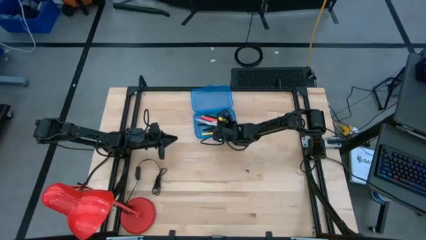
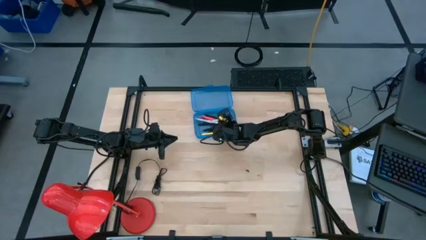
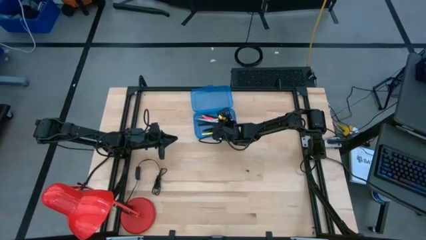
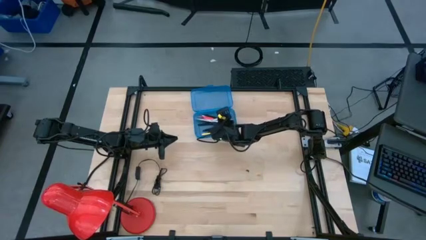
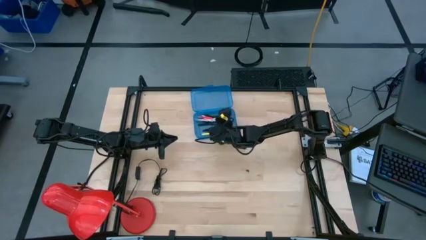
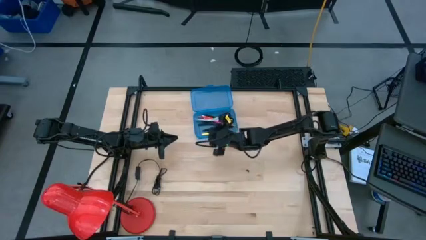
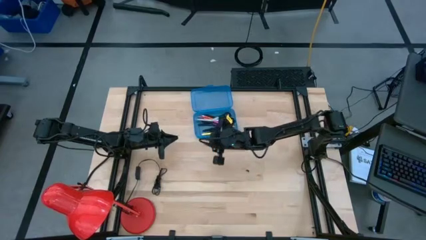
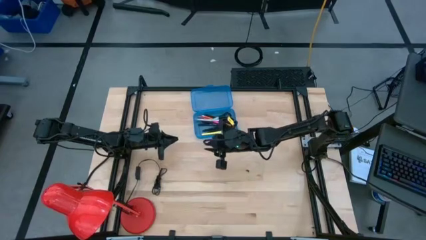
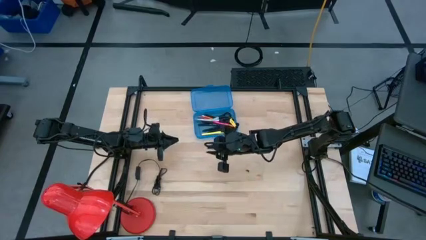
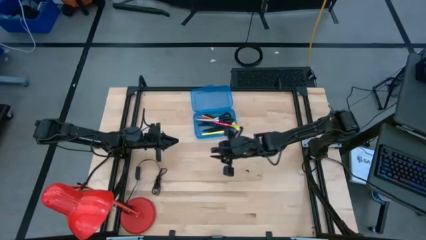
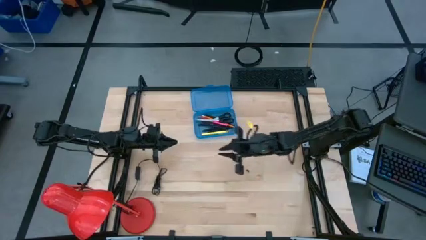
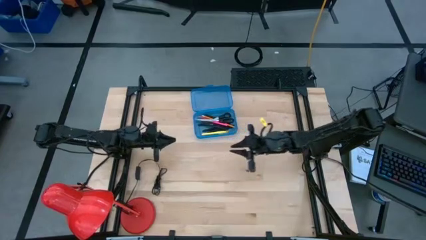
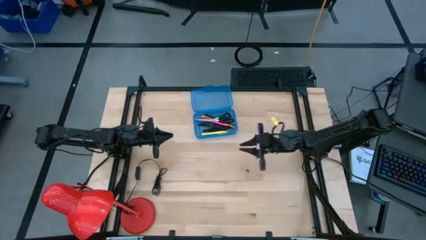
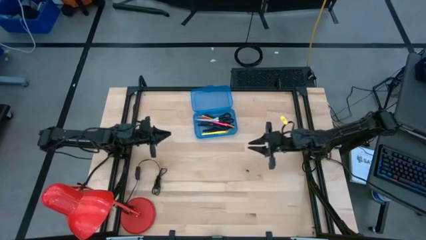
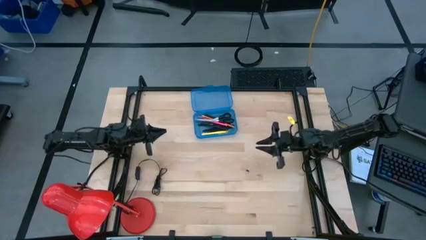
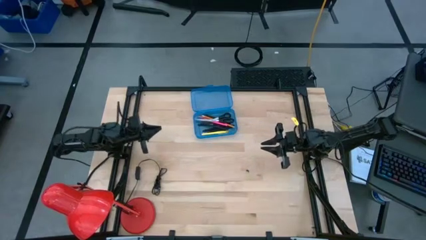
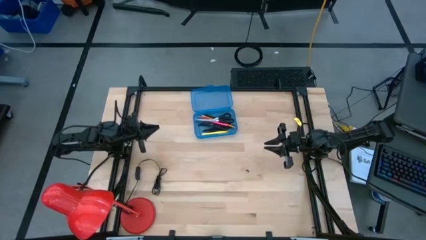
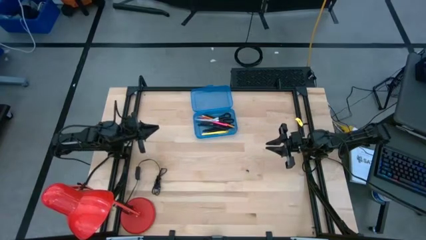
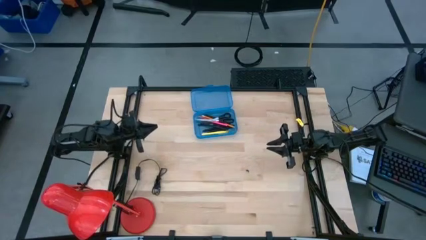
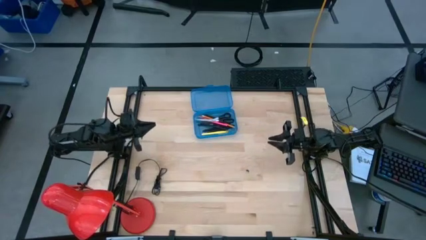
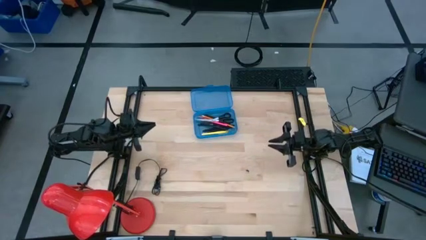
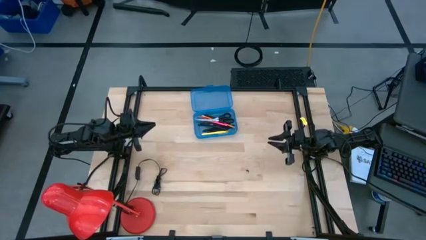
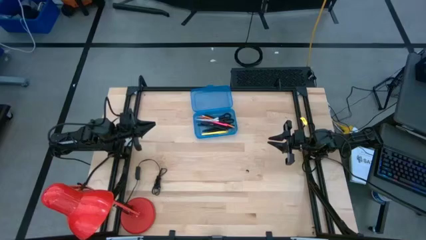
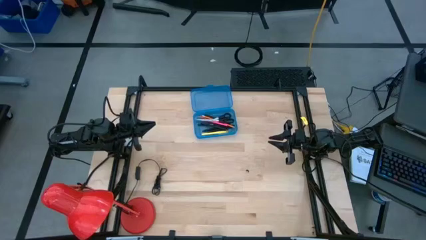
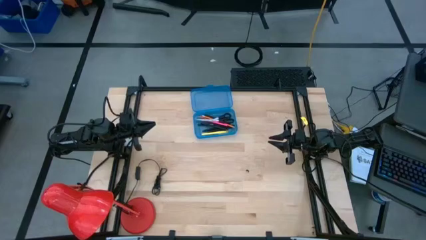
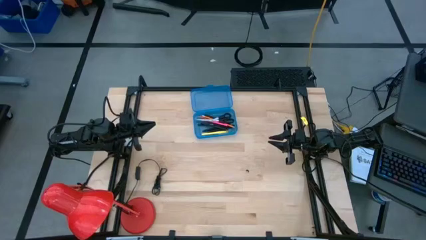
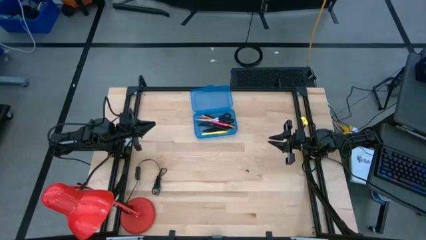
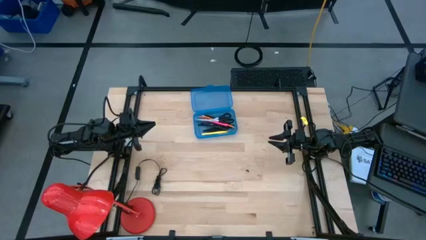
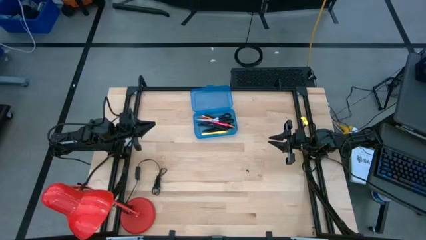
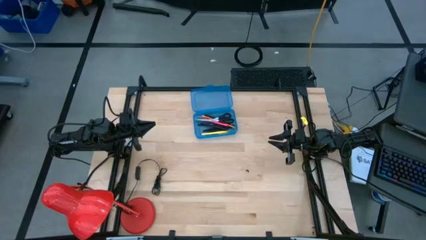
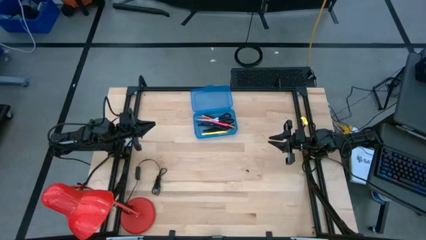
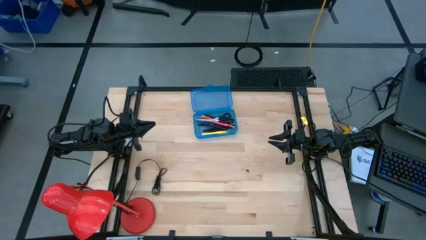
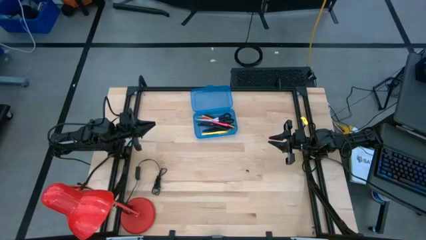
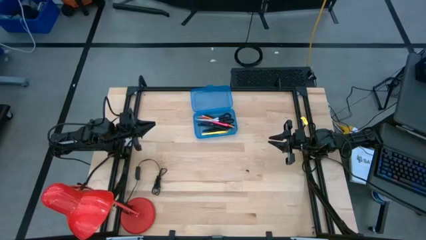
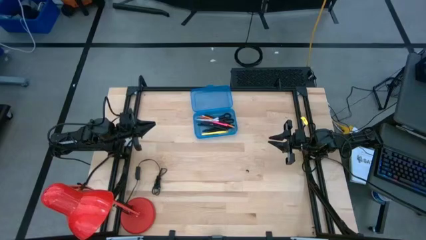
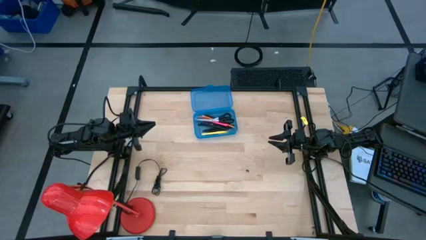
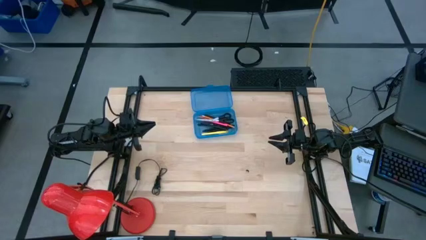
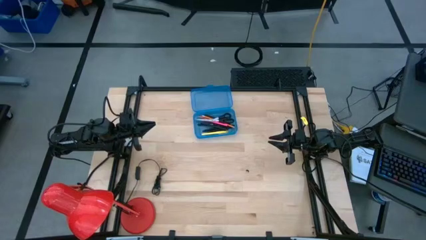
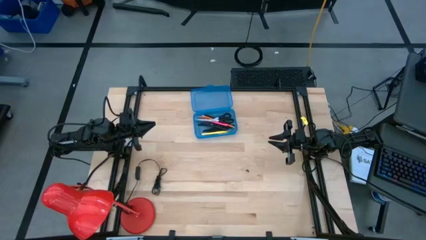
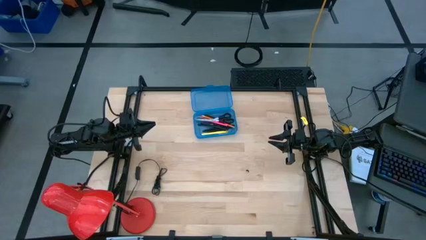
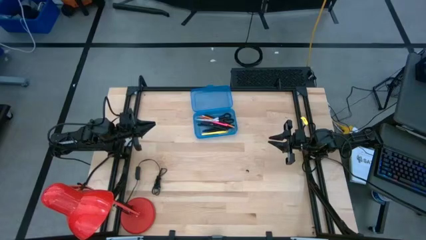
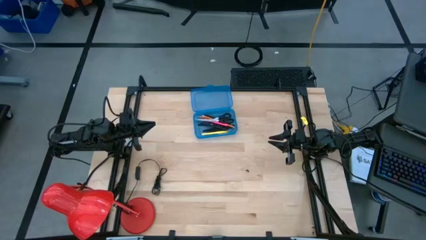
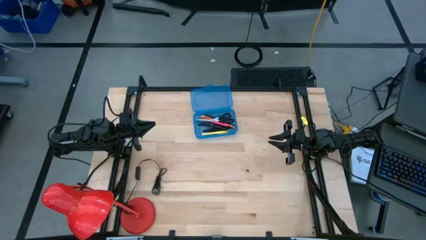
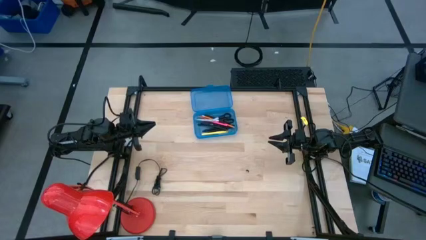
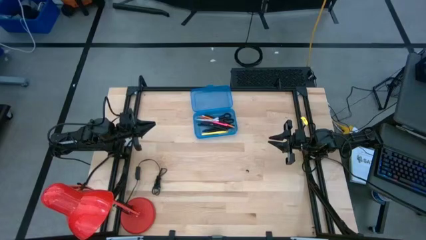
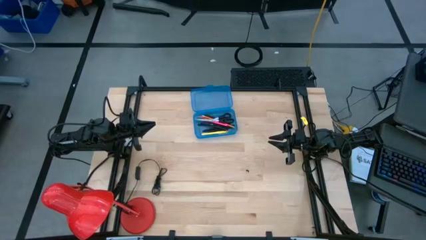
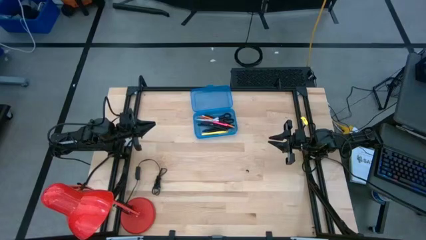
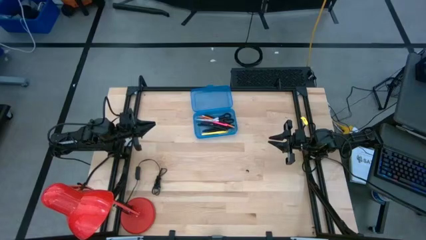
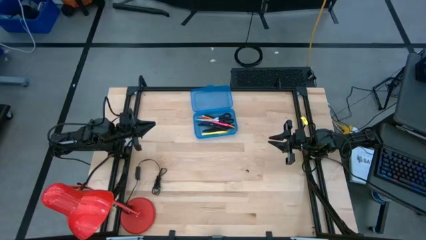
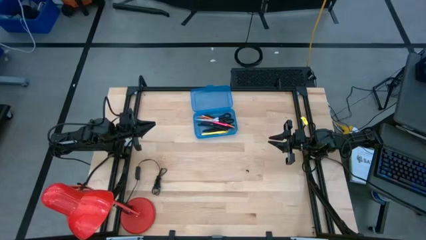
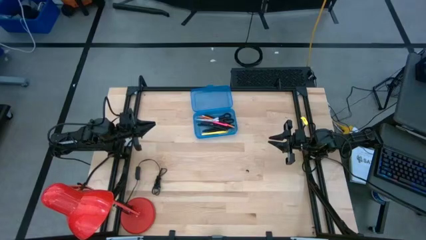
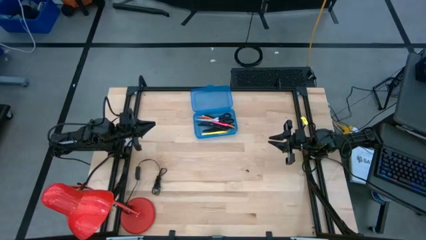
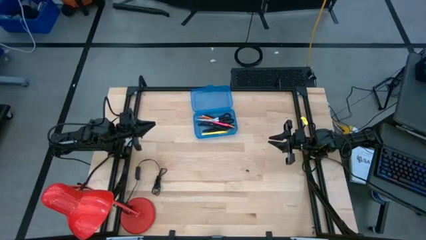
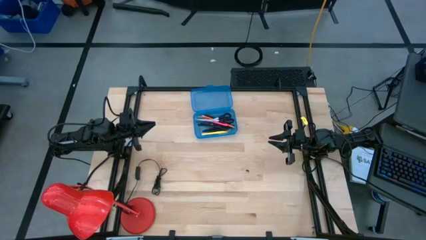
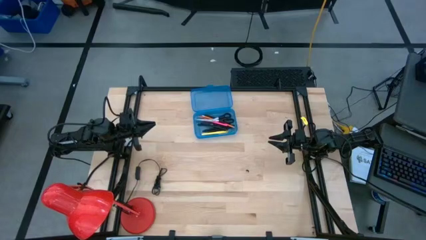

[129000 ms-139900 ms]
Task: Pick & place school supplies into a supply box
Return to Home Position

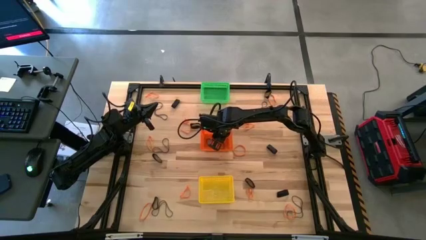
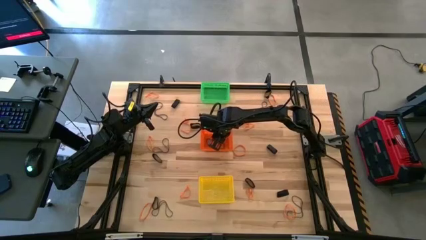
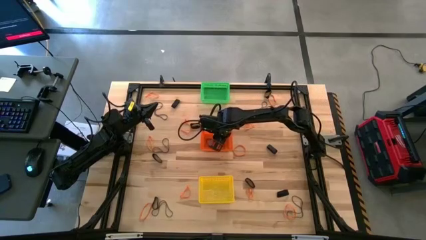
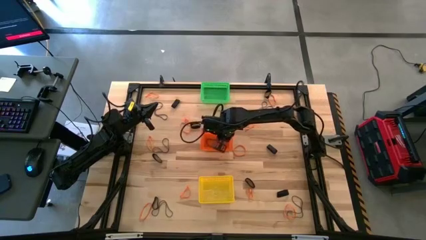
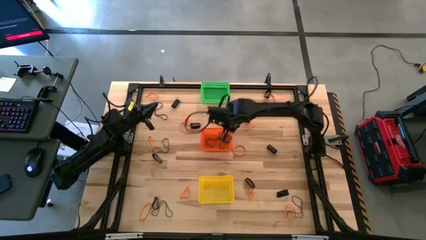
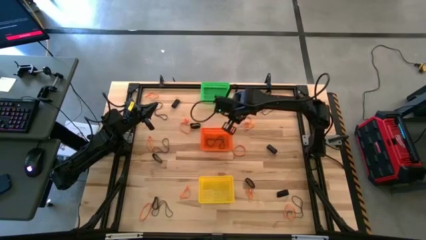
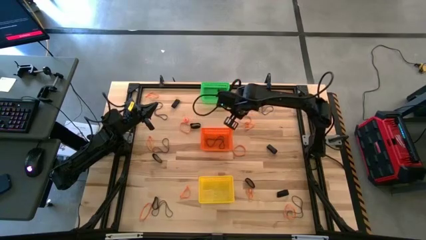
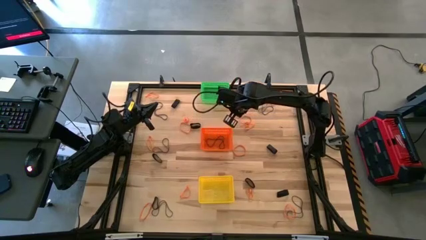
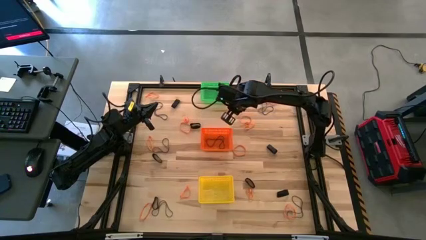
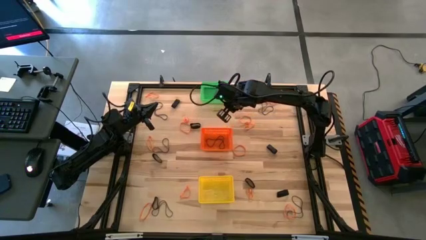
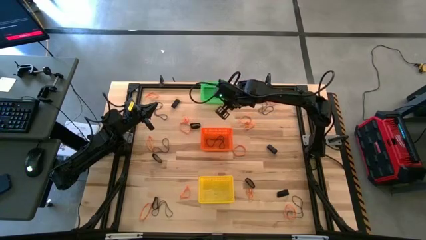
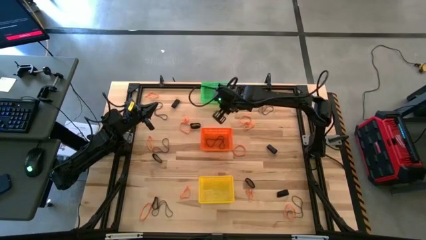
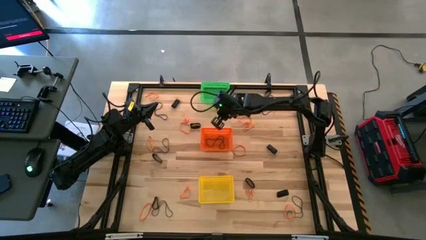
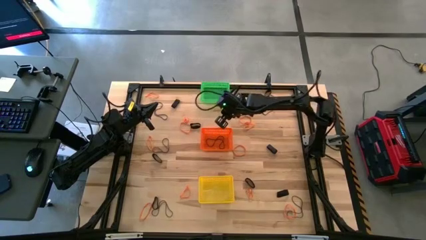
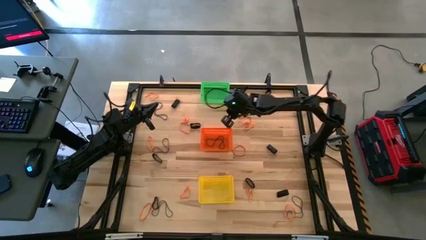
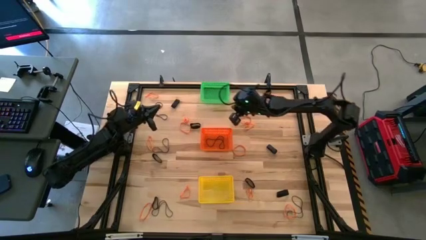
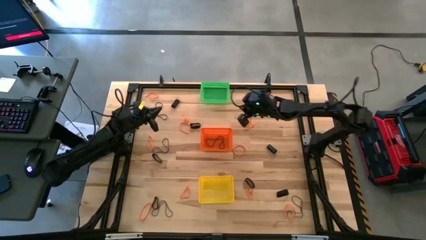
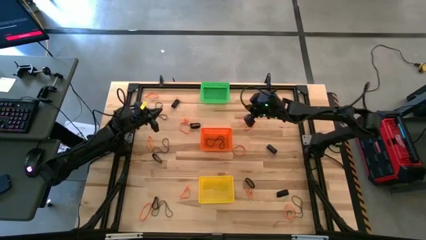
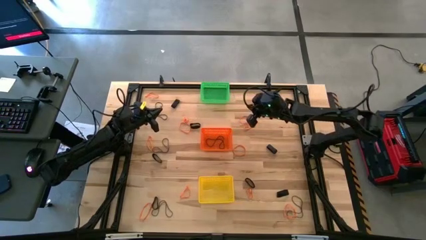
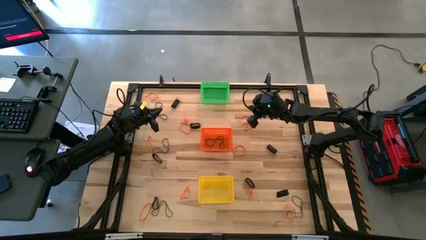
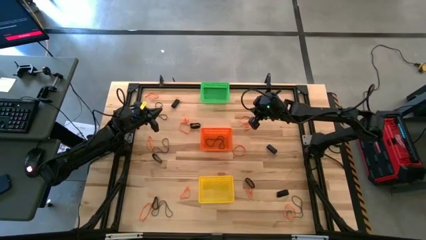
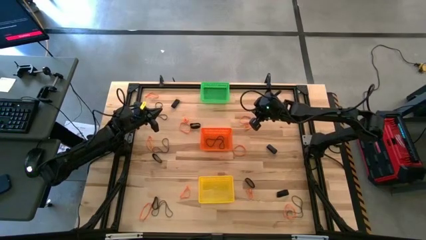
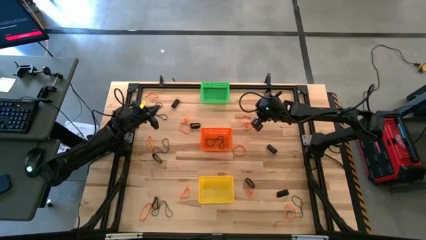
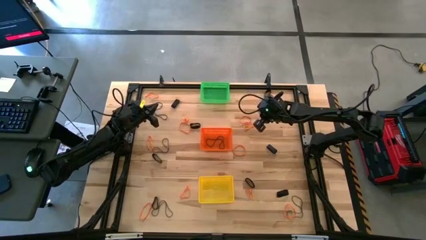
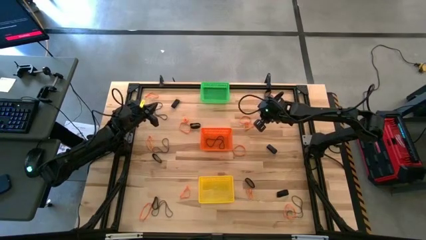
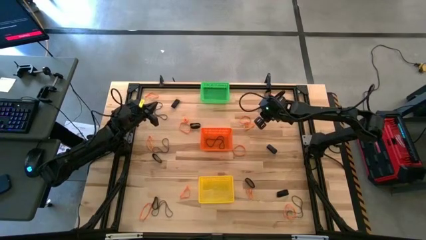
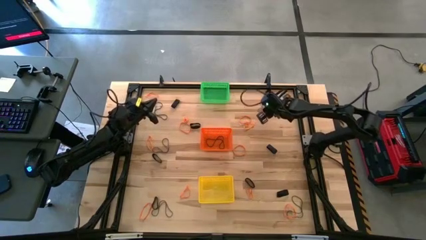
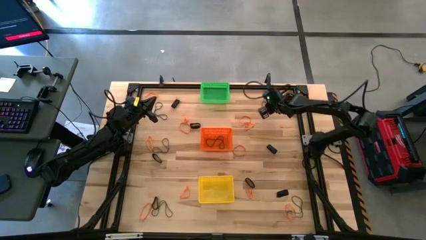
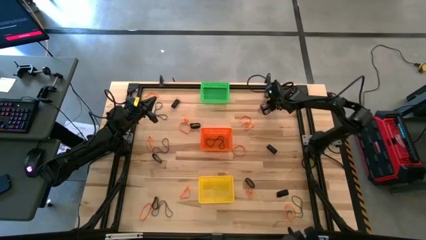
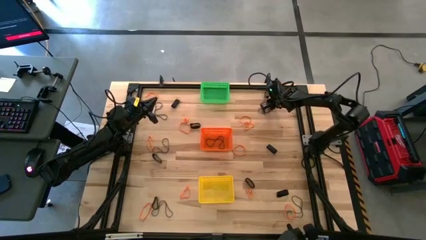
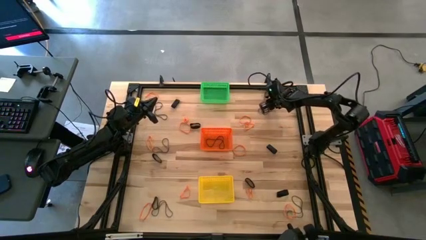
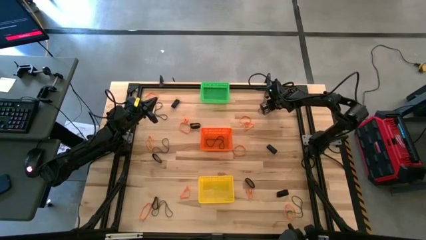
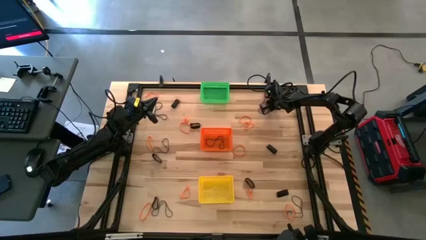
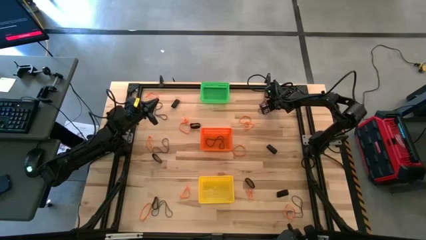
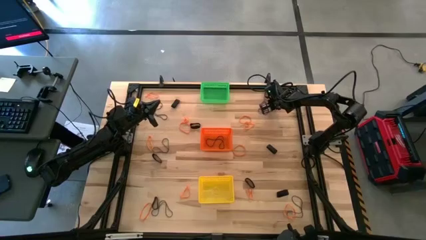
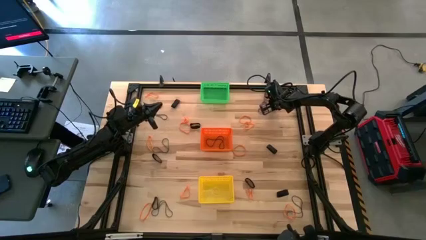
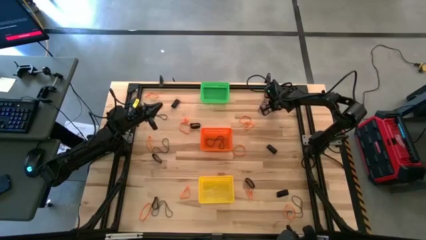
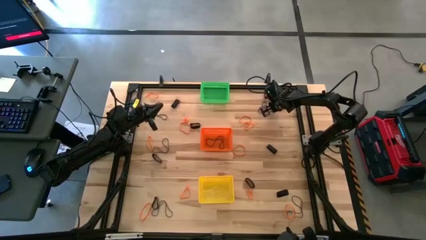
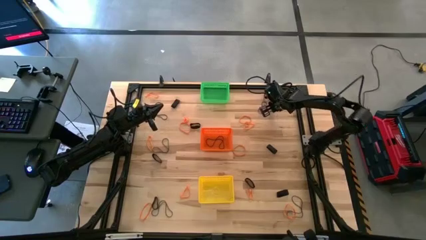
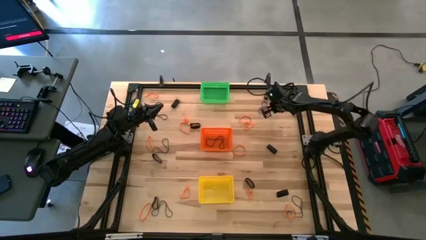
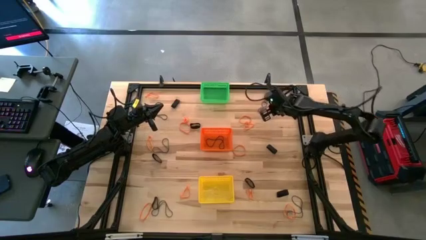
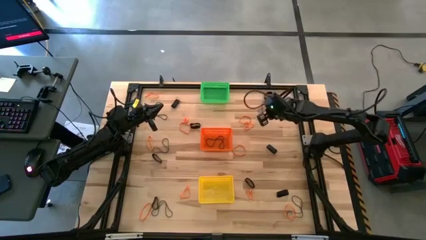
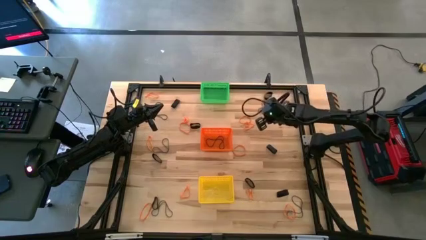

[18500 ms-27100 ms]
Task: Sort rubber bands into baskets
Put the orange rubber band into the yellow bin
